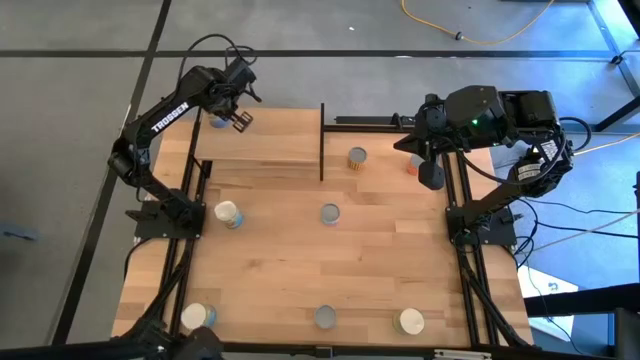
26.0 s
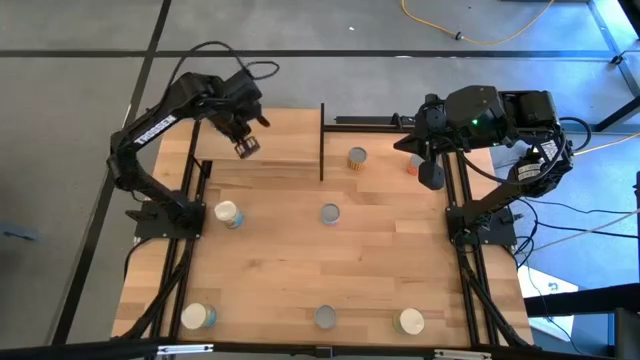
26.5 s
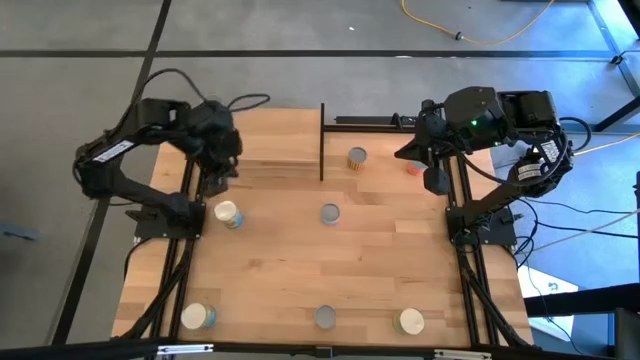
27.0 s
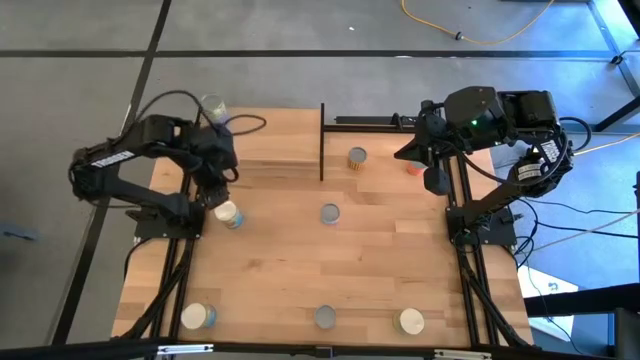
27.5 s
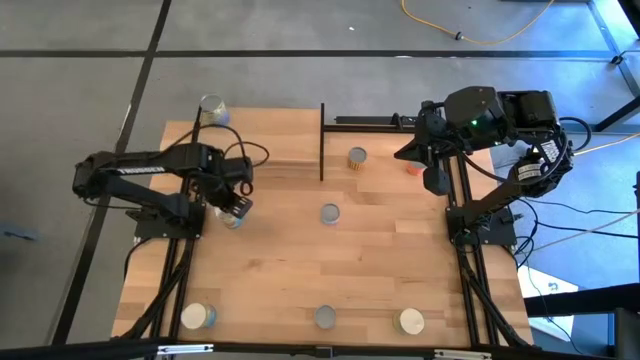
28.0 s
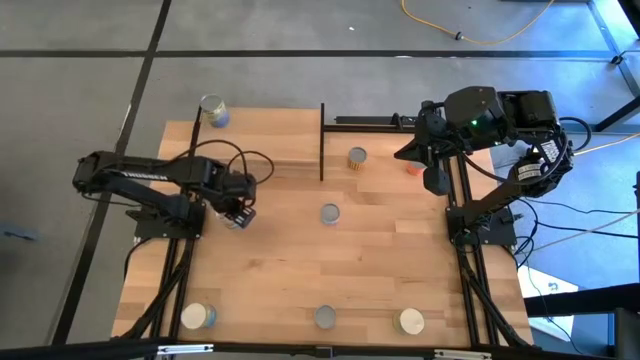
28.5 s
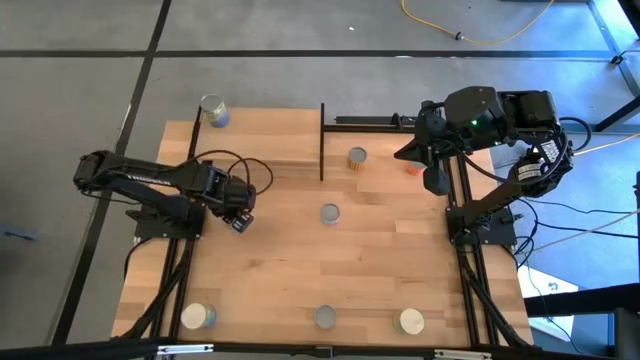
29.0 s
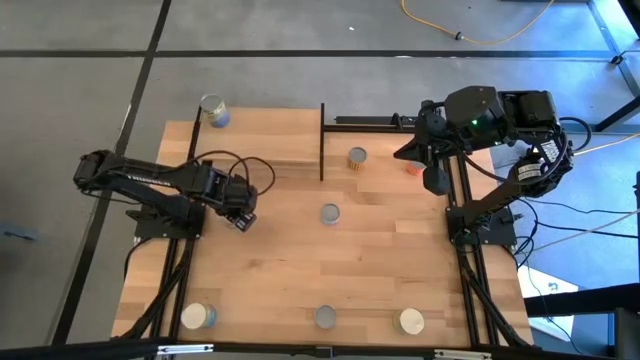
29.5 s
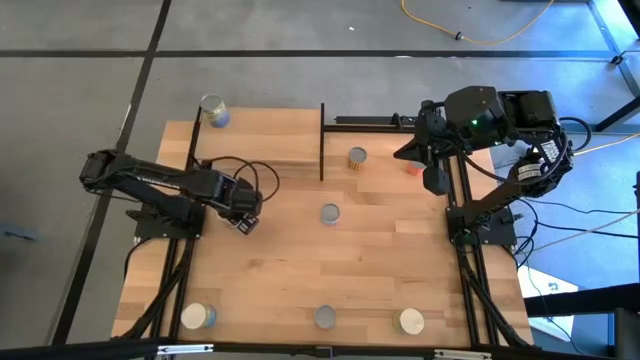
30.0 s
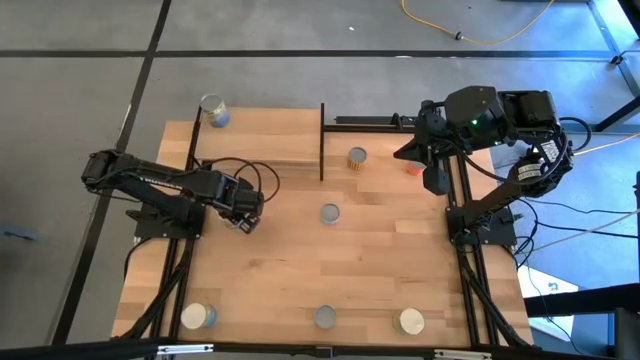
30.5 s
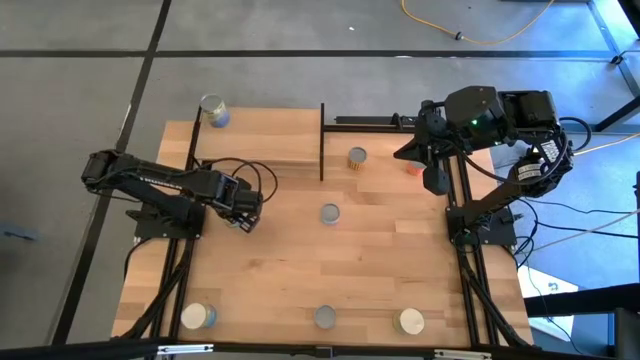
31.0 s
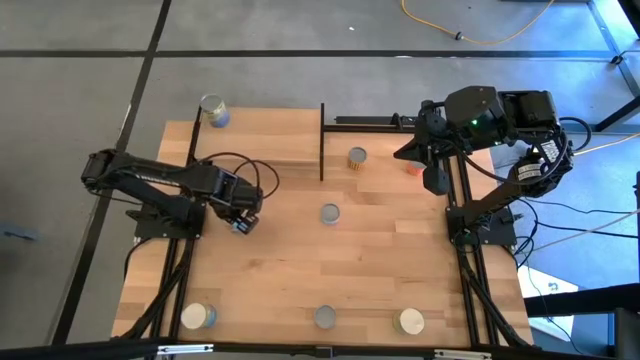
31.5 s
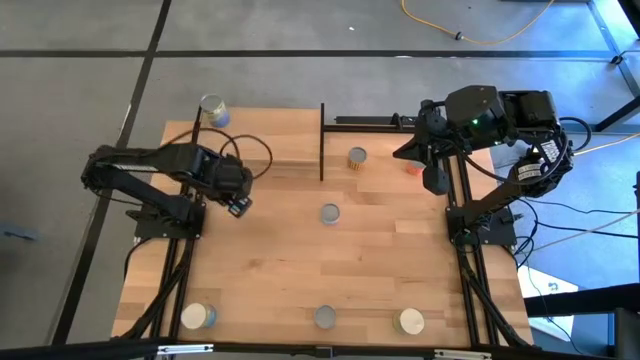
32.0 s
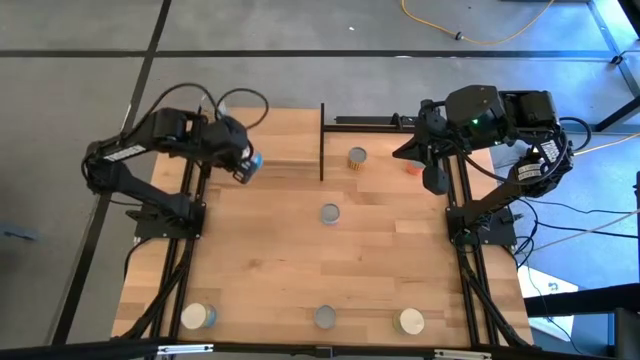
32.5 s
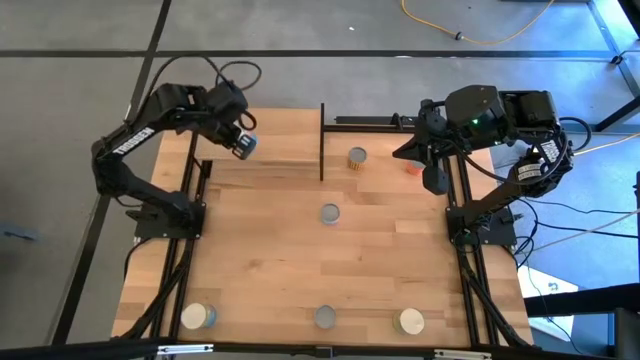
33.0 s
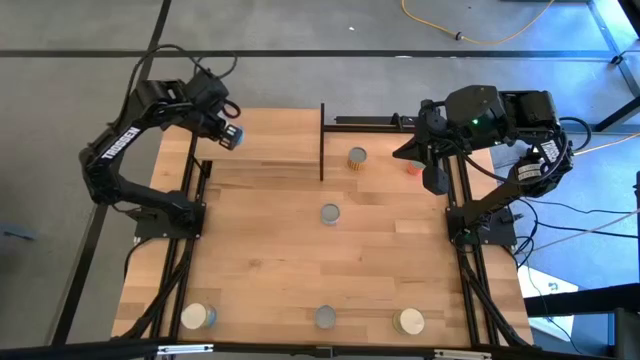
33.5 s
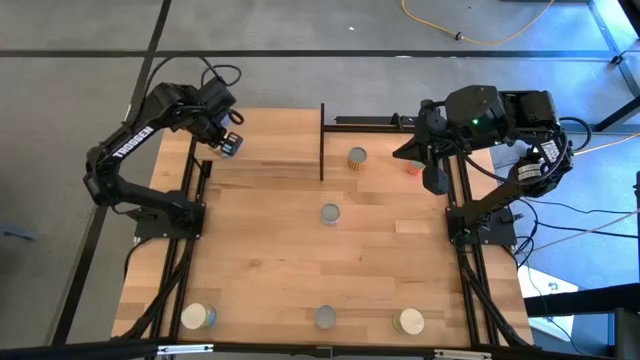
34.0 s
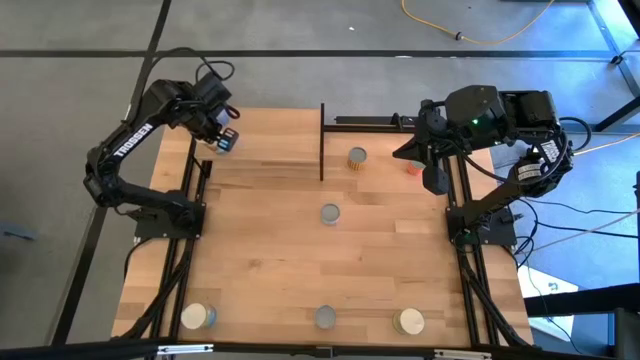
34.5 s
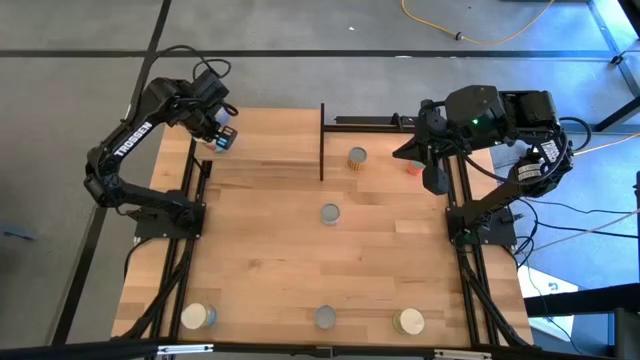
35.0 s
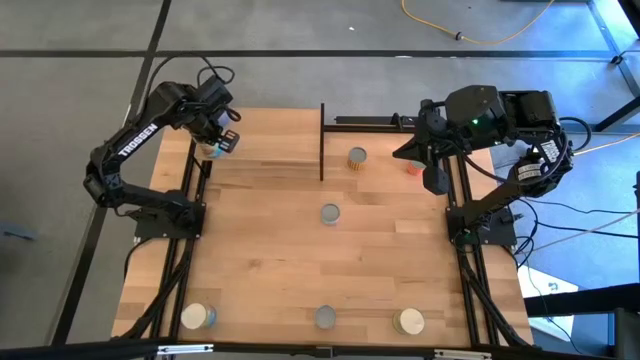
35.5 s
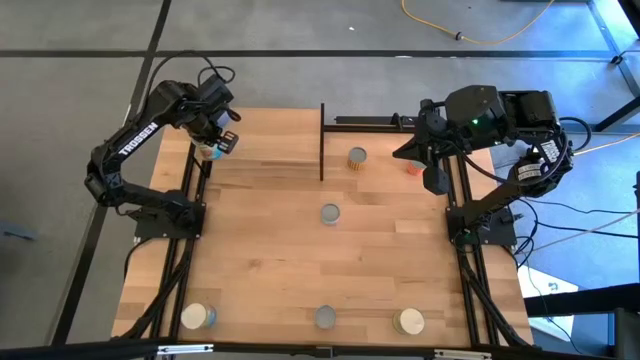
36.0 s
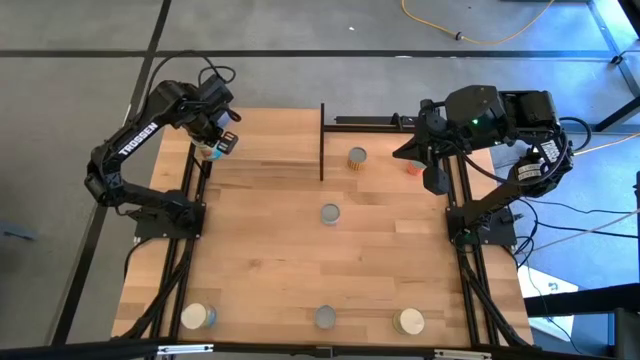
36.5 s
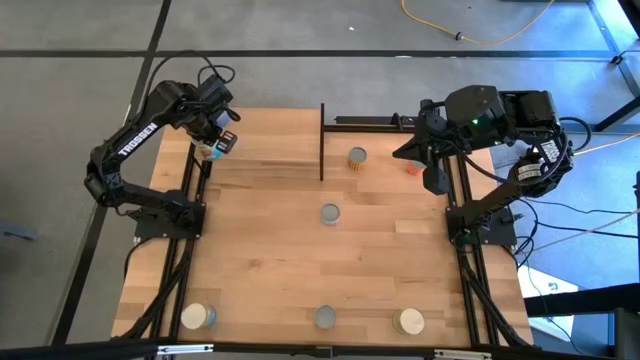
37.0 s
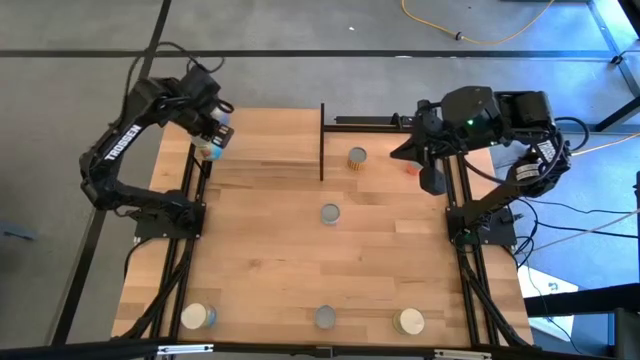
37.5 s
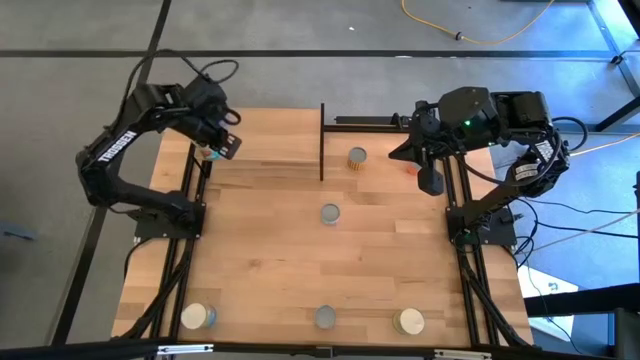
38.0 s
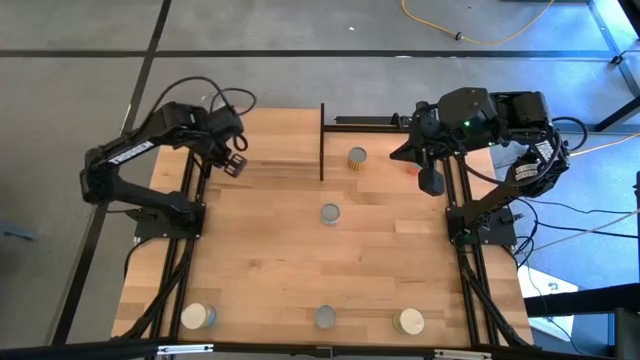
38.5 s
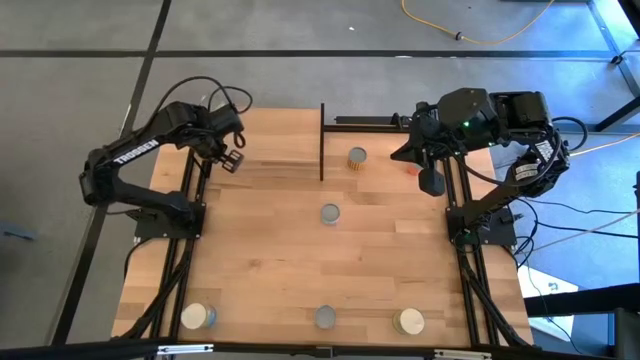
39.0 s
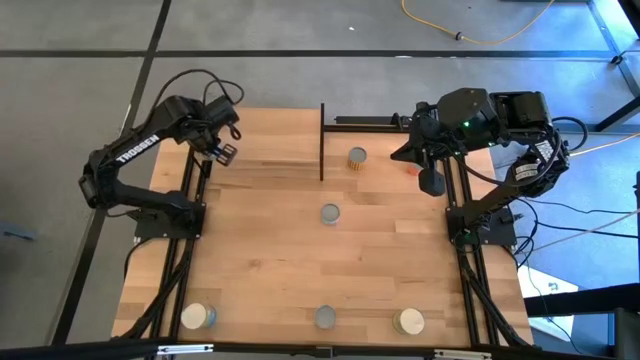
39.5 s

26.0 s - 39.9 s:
Task: Pick and place cans onto a shelf
Put the top blue canned tomatoes on the shelf aligned with the other blue canned peas

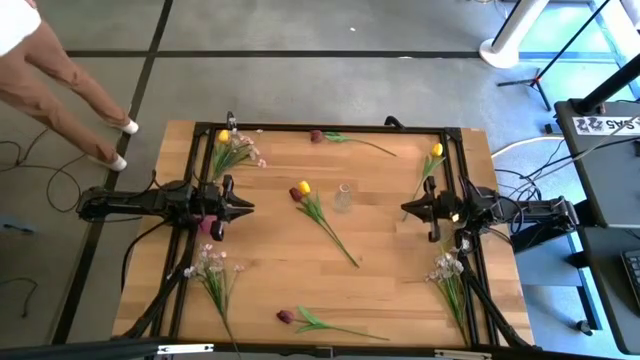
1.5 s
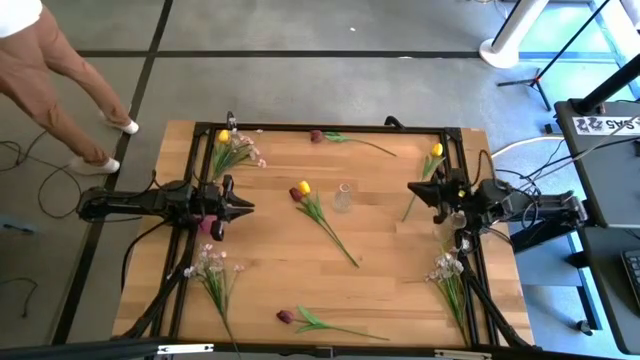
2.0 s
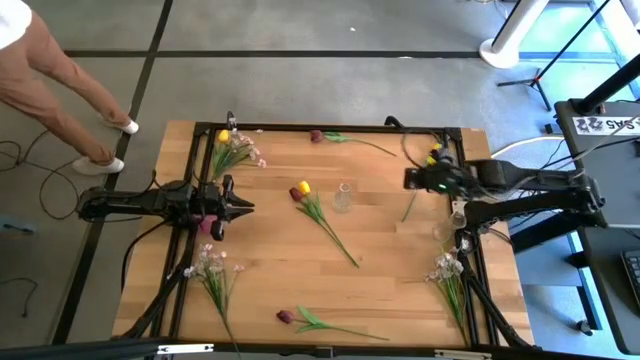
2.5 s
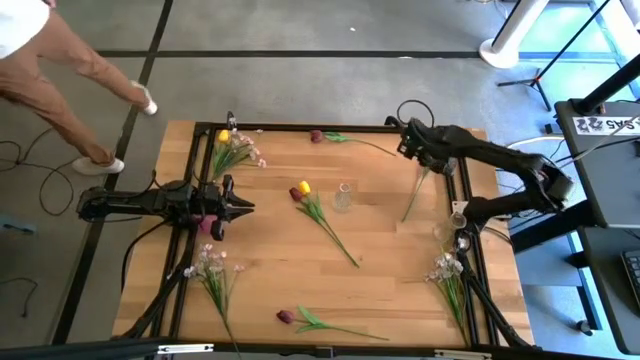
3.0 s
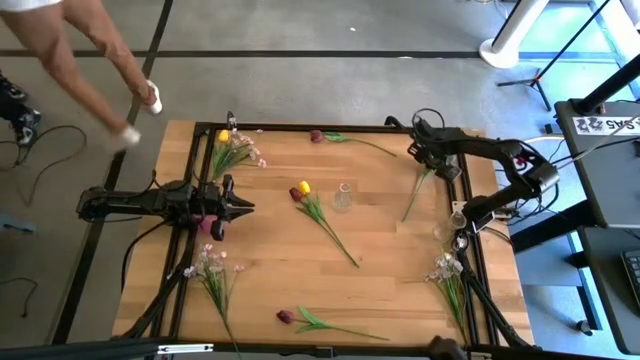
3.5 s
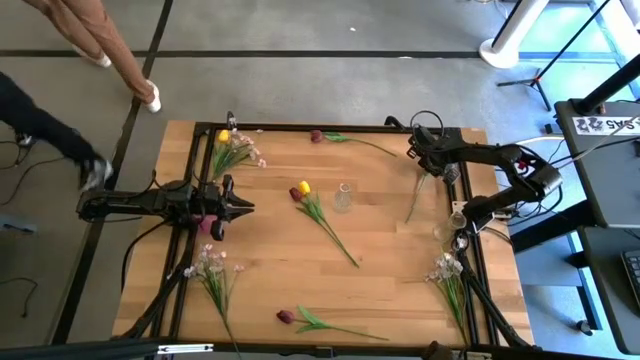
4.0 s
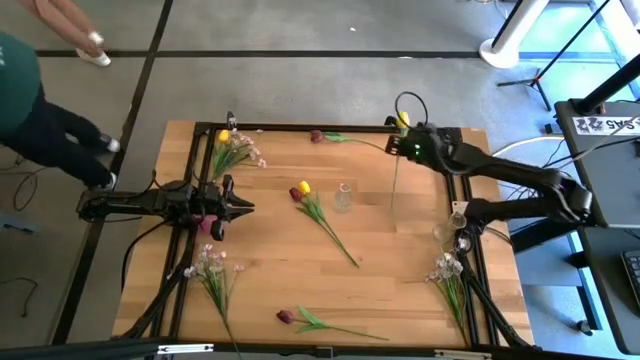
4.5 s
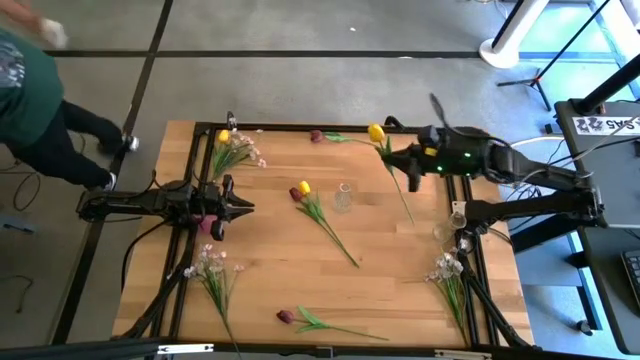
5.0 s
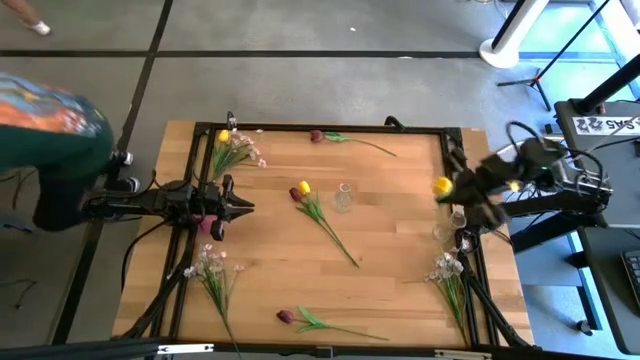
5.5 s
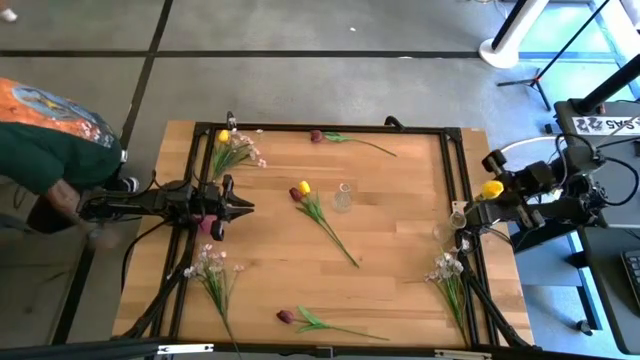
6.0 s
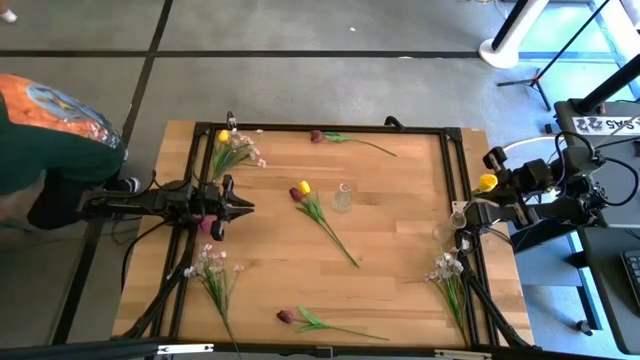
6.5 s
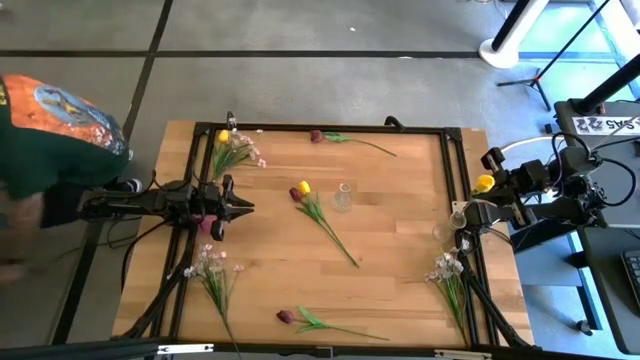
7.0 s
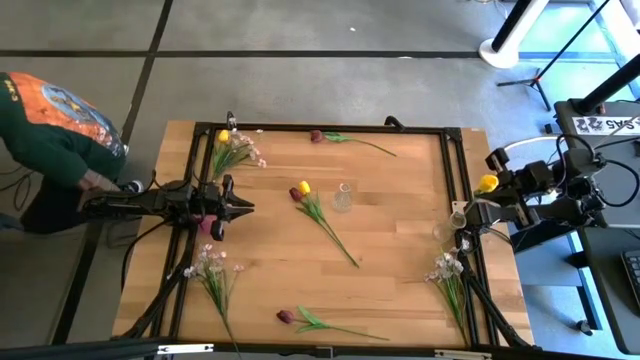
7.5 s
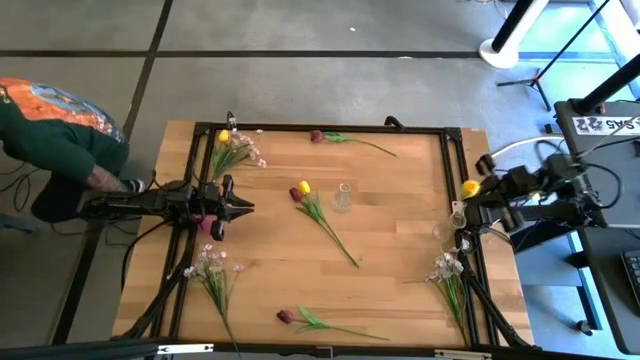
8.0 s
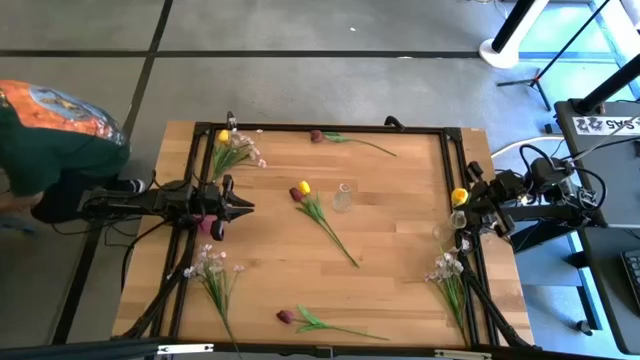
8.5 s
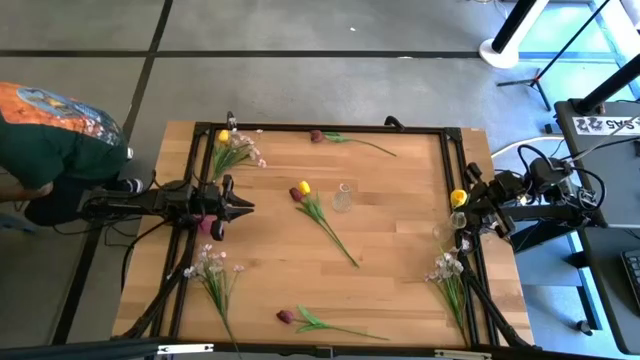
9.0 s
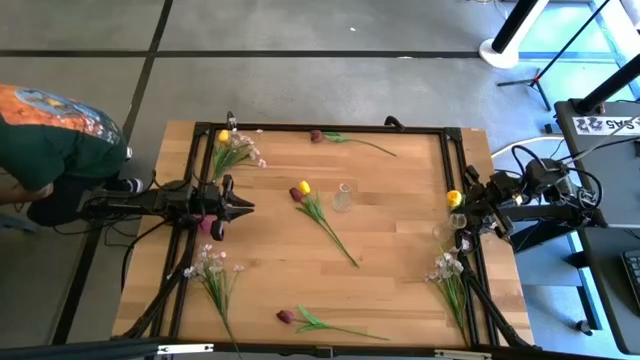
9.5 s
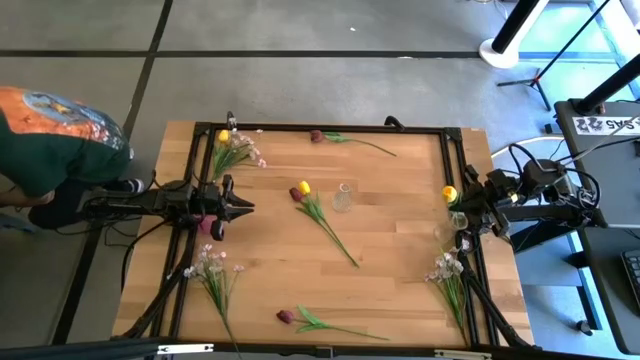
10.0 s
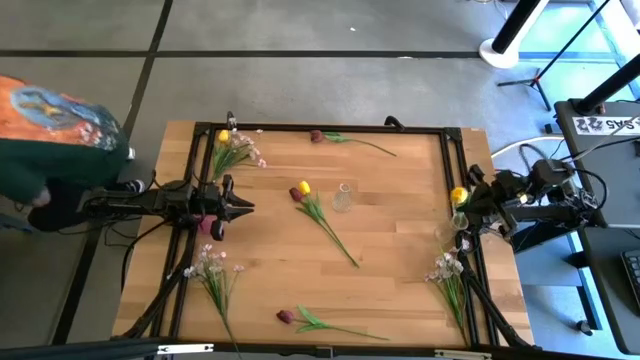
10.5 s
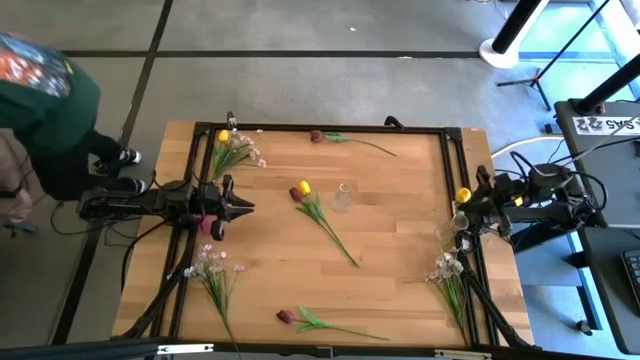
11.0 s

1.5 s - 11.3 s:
Task: Sort flowers into vase by color
Put the top right yellow tulip into the bottom transparent vase
